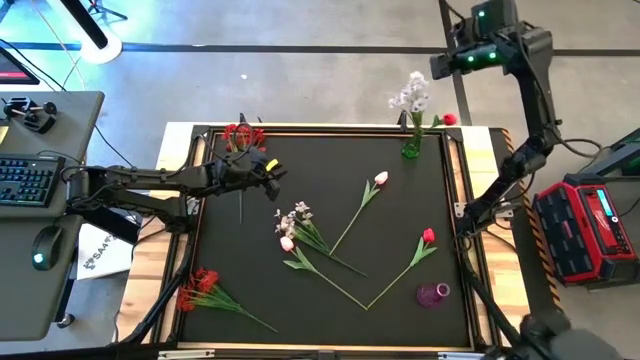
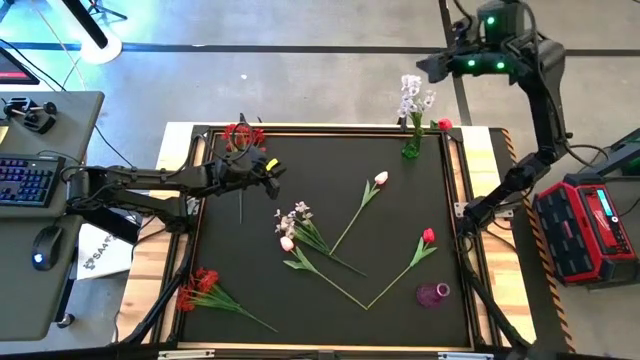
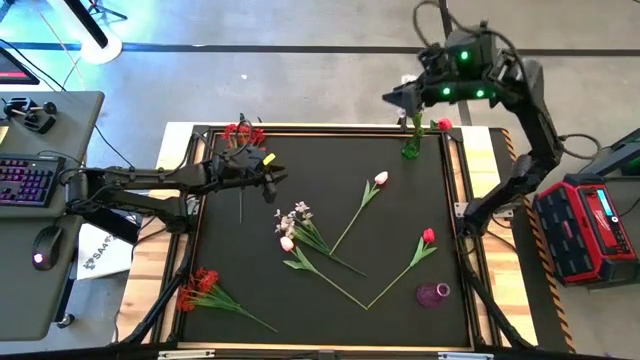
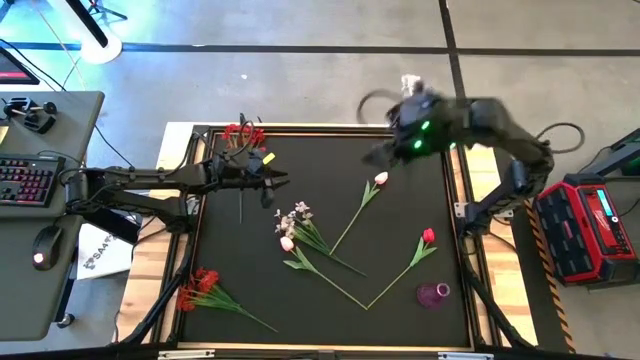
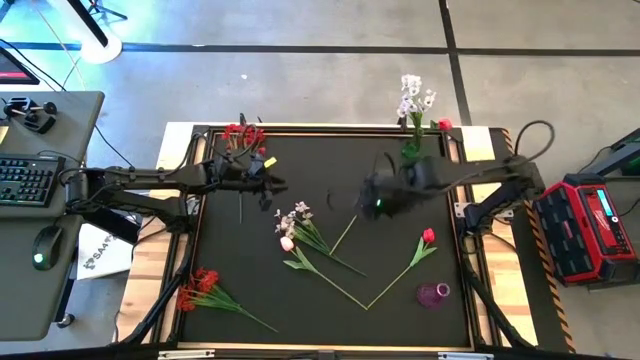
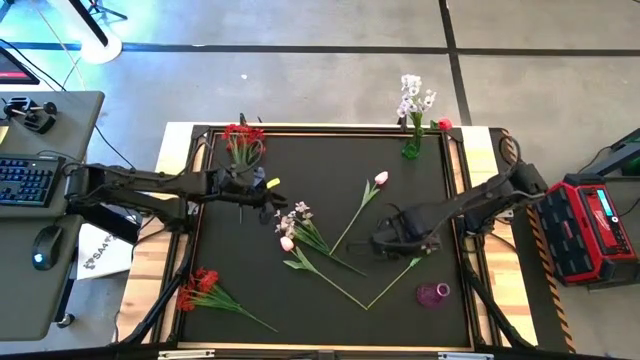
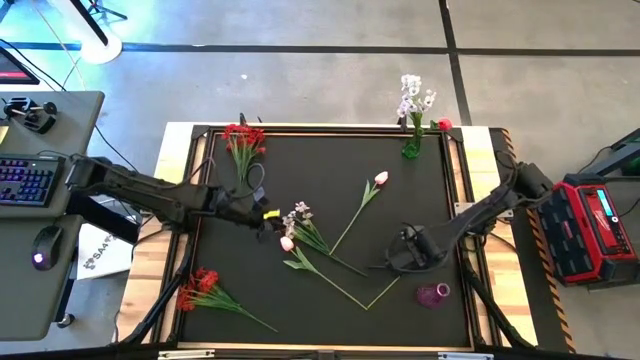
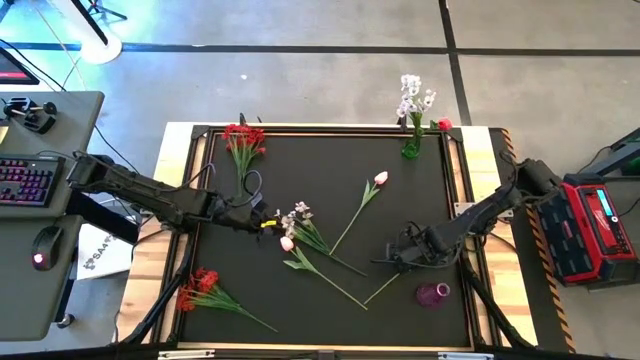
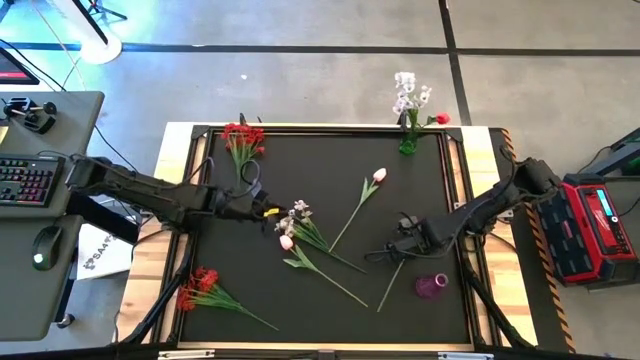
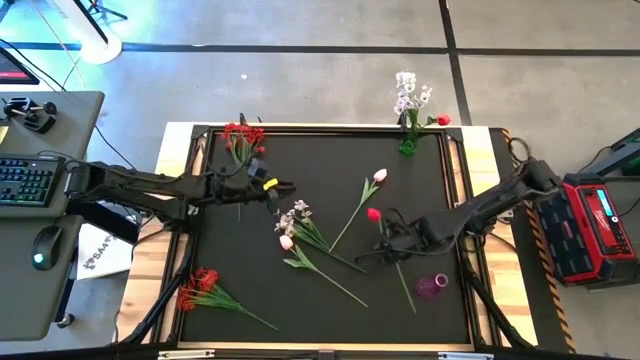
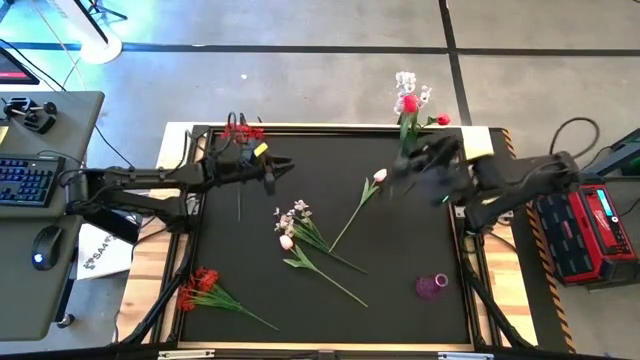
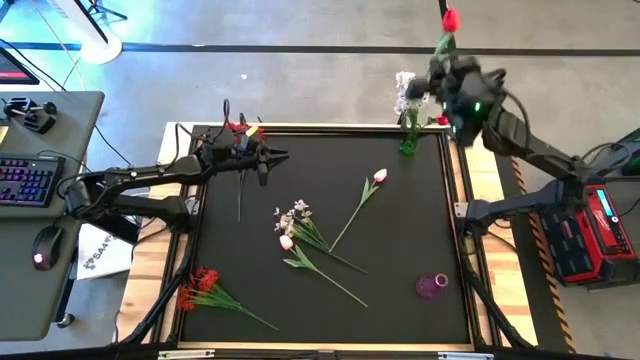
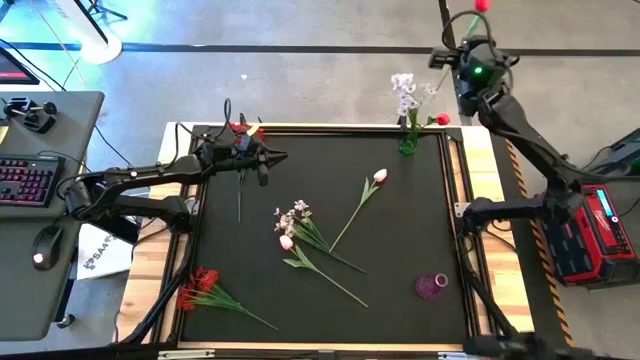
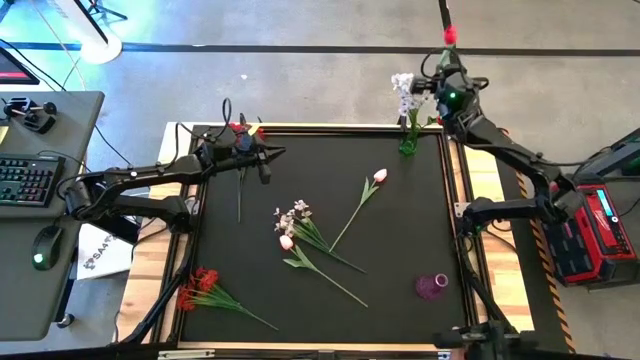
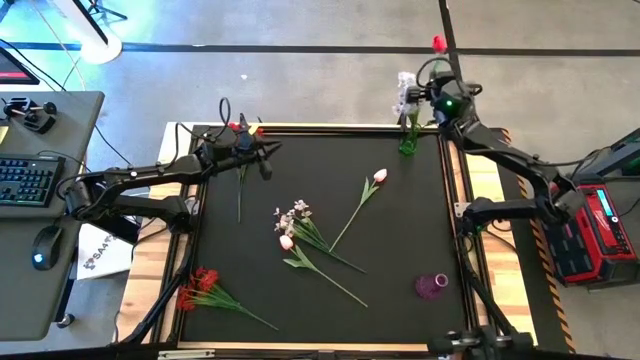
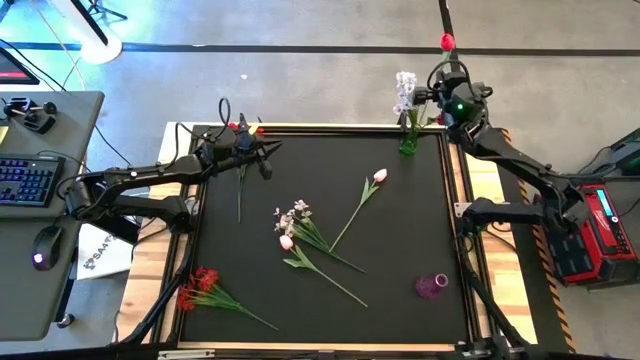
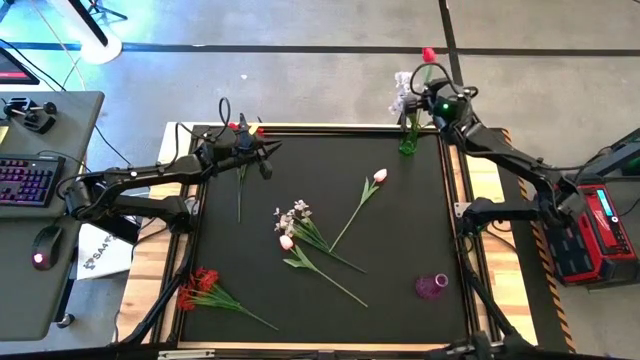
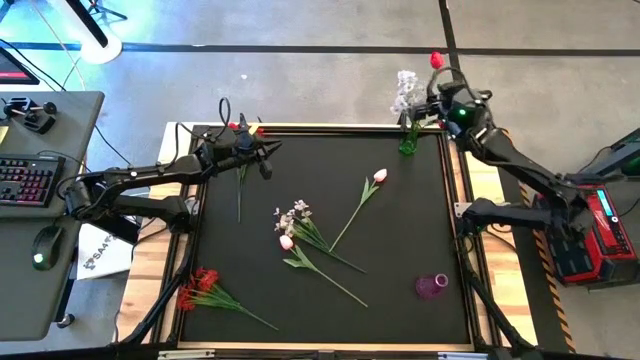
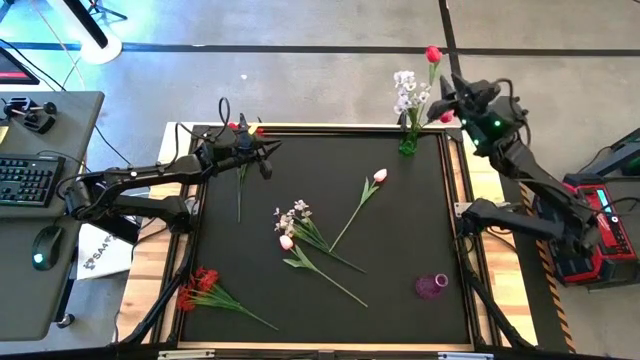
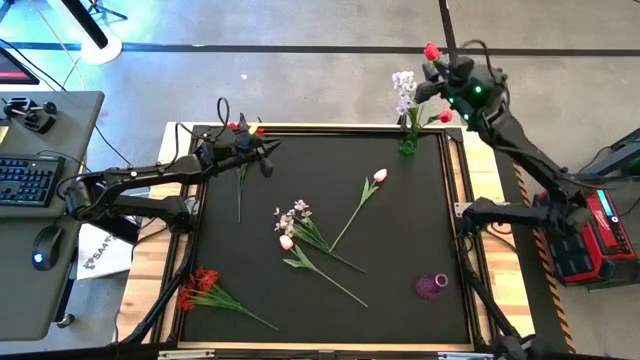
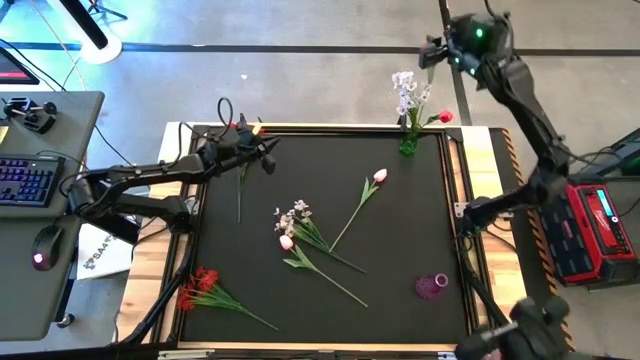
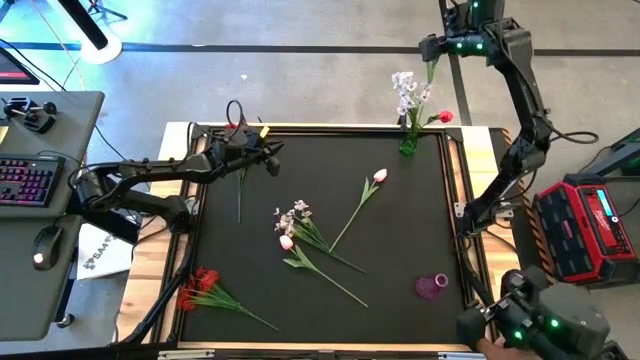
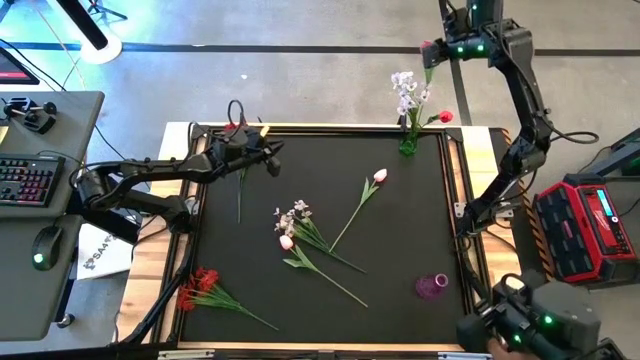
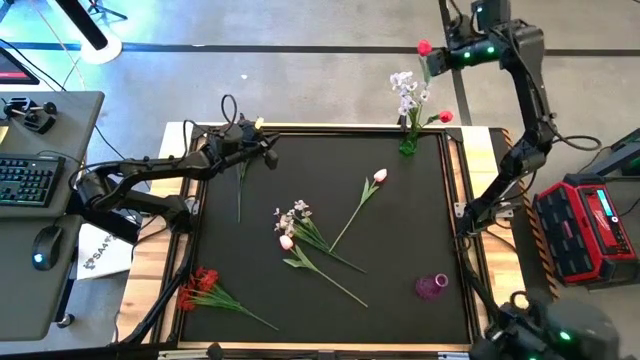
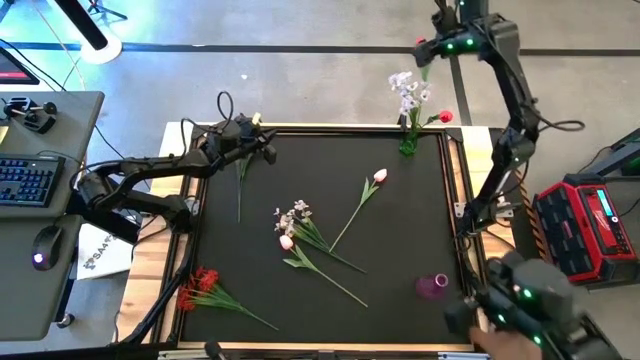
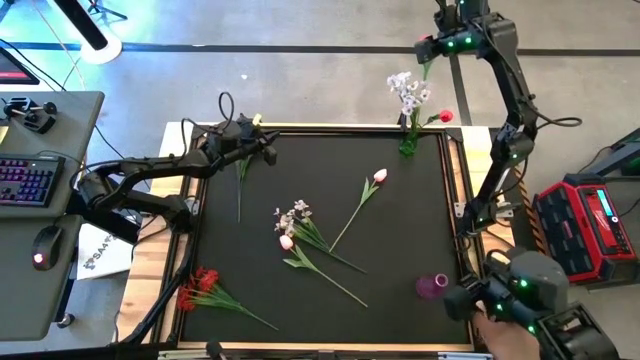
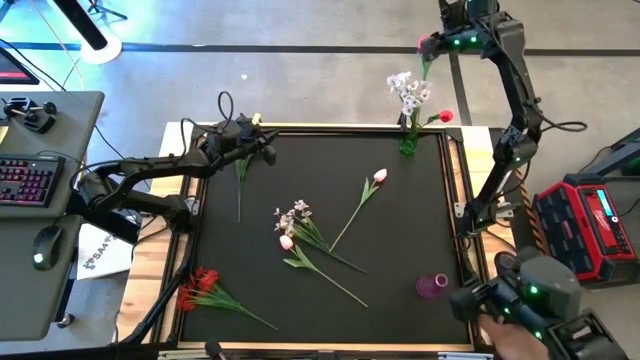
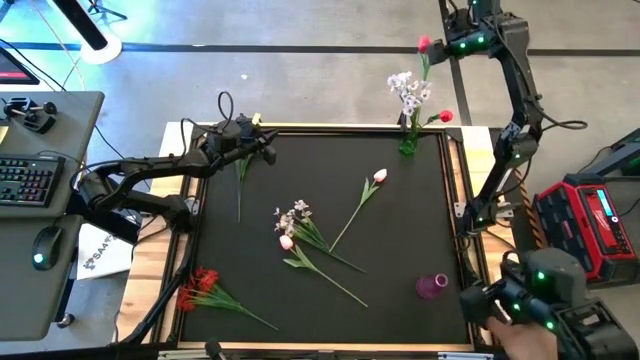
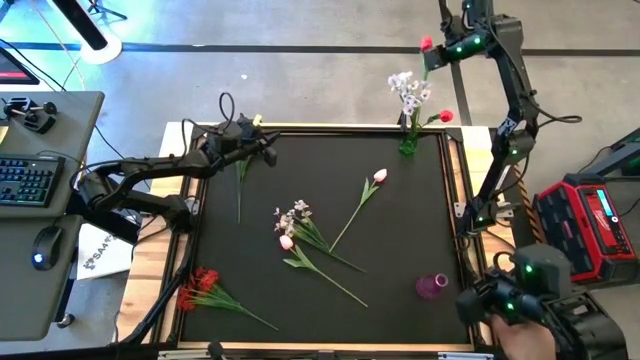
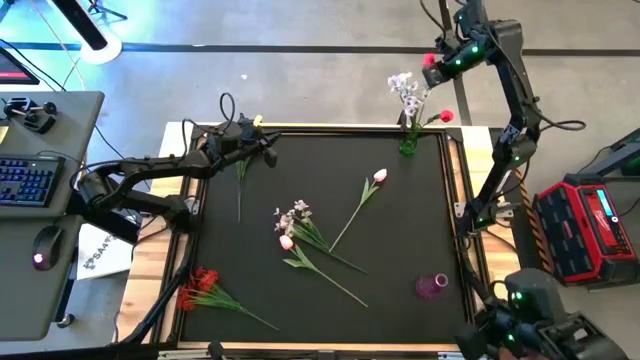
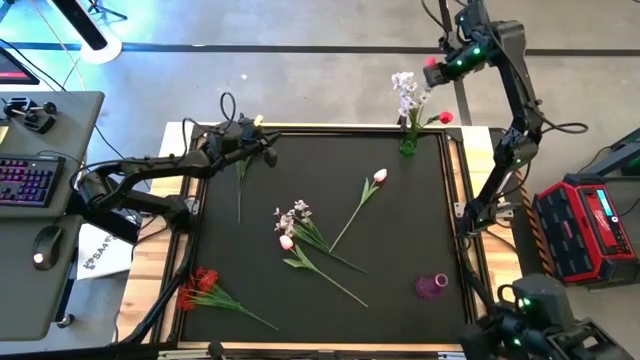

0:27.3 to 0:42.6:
Task: Sort flowers into vase by color
Put the red tulip into the green vase

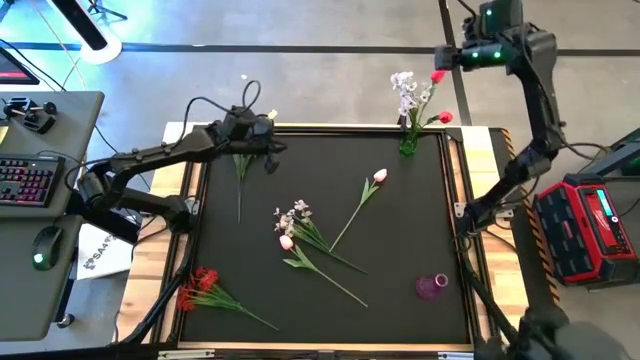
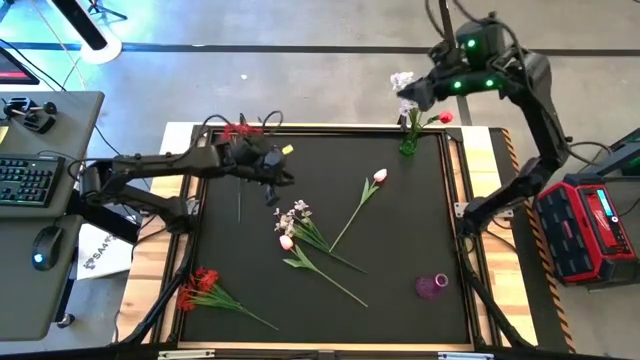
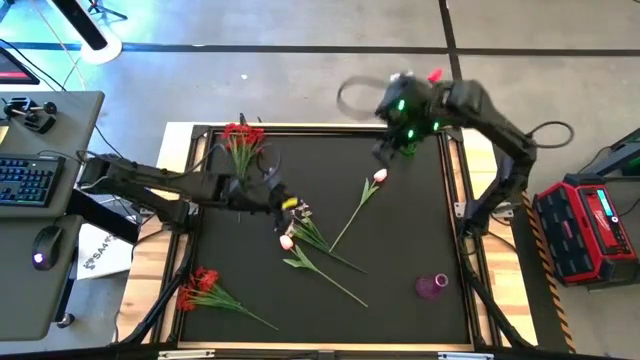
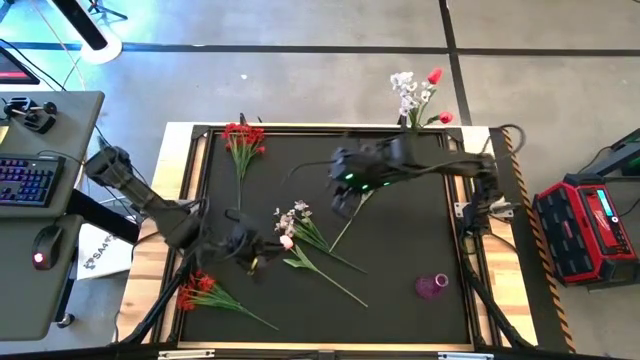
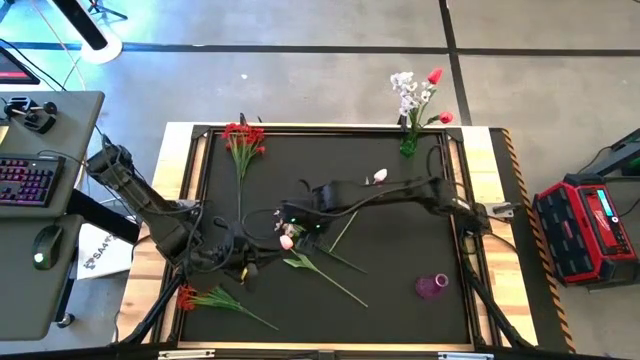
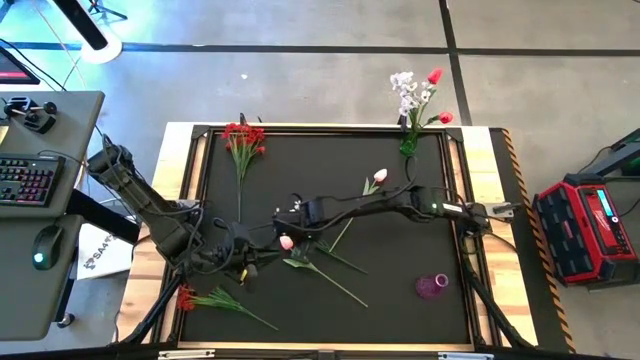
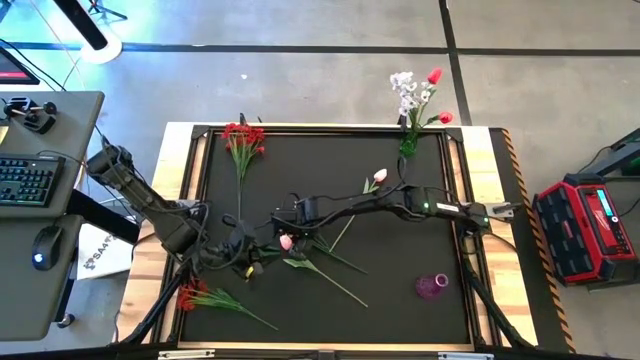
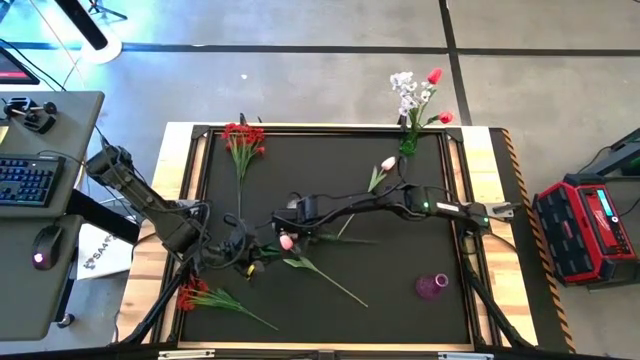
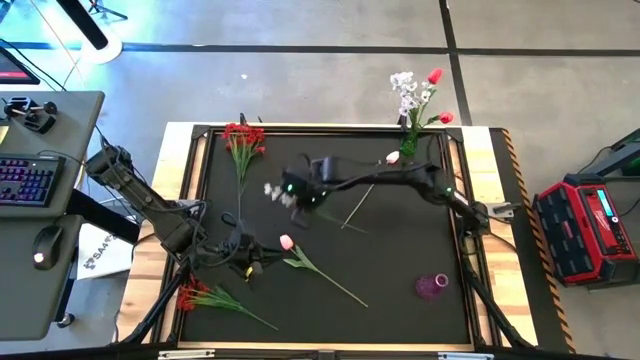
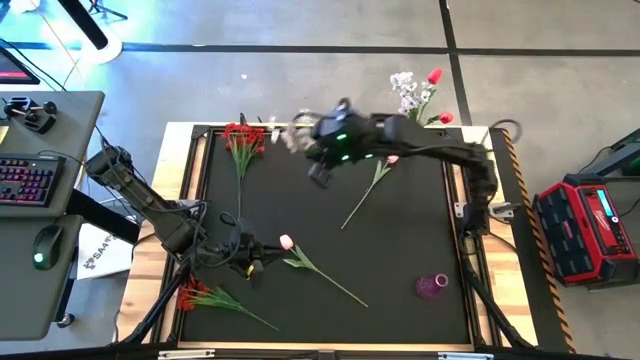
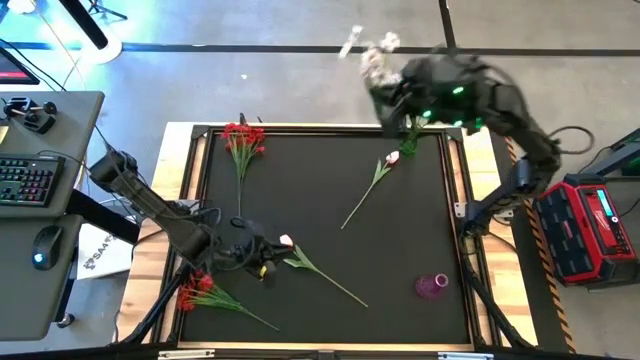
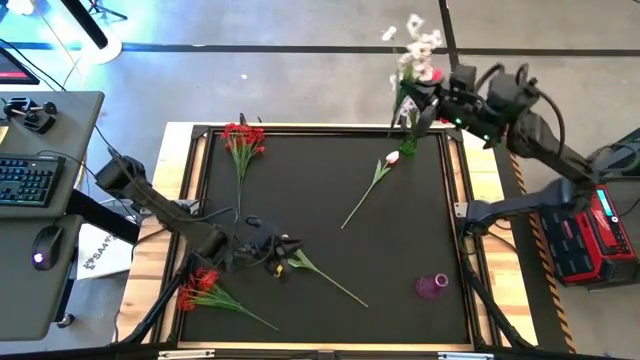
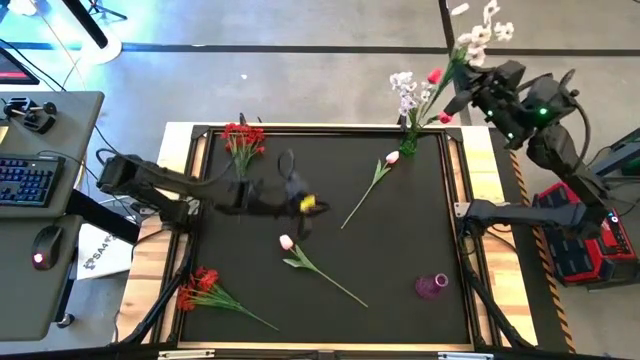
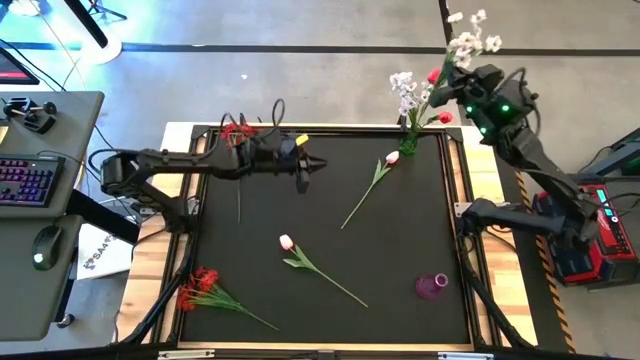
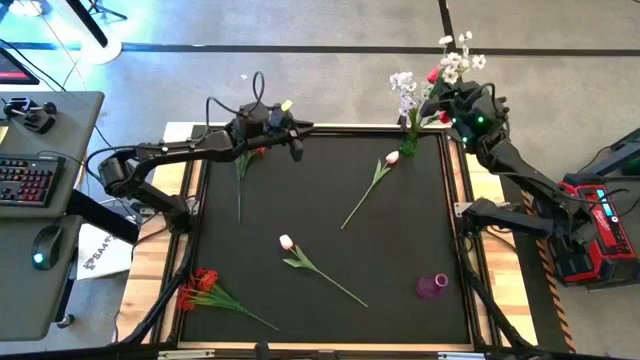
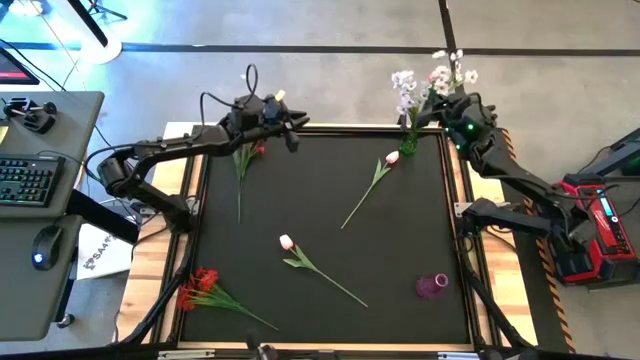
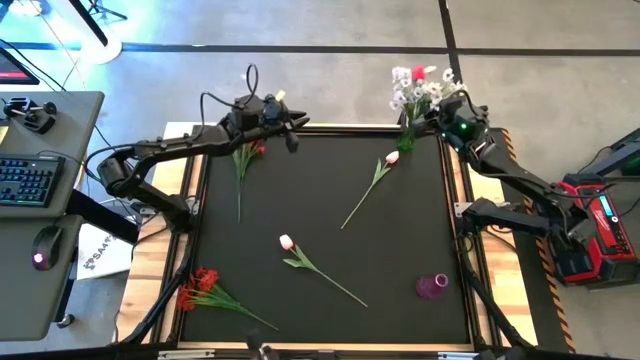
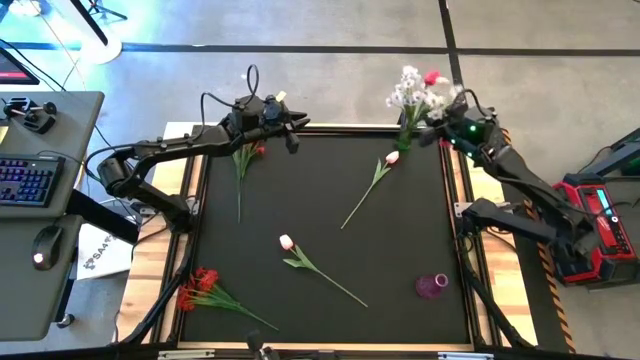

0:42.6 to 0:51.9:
Put the white flowers into the green vase
